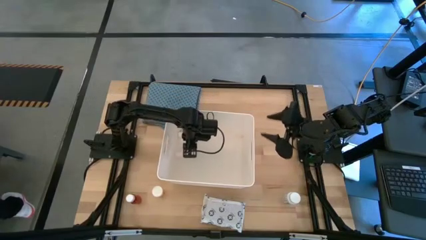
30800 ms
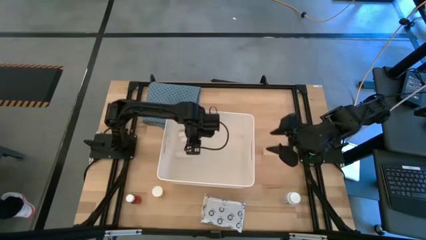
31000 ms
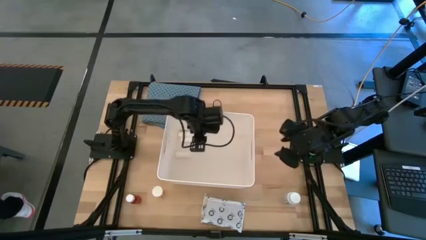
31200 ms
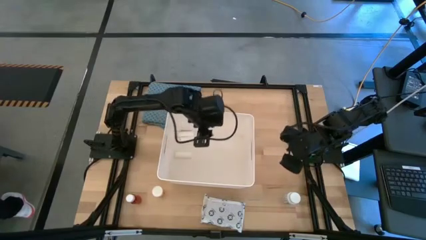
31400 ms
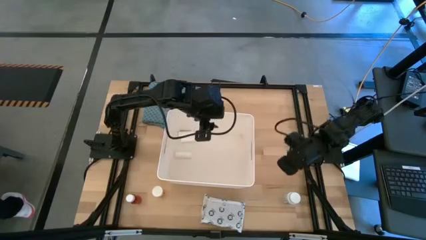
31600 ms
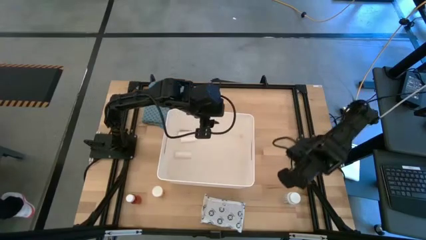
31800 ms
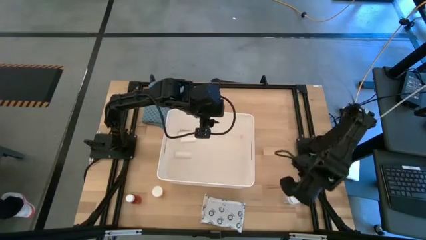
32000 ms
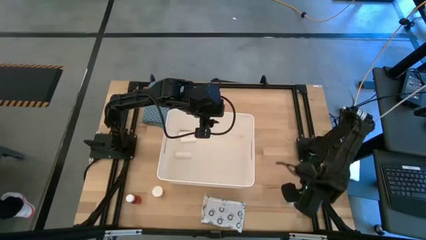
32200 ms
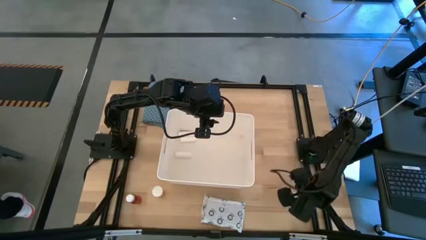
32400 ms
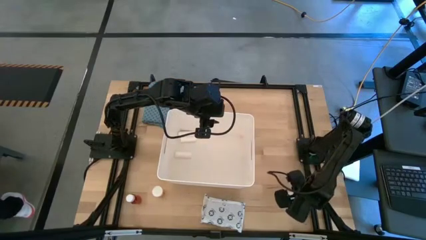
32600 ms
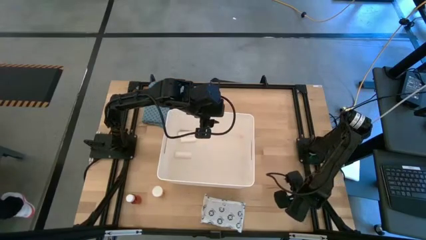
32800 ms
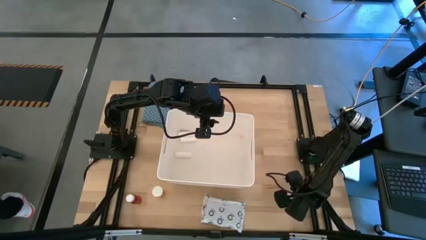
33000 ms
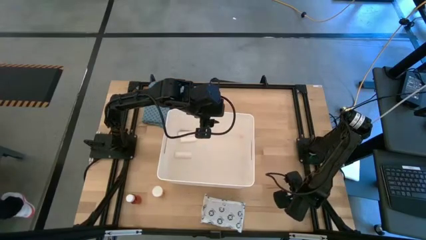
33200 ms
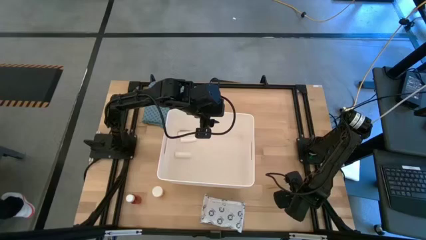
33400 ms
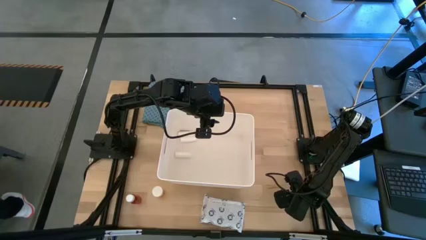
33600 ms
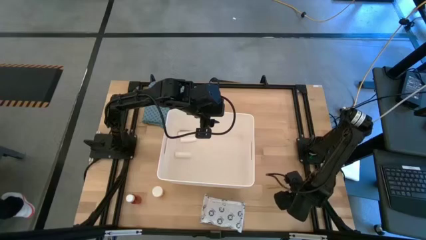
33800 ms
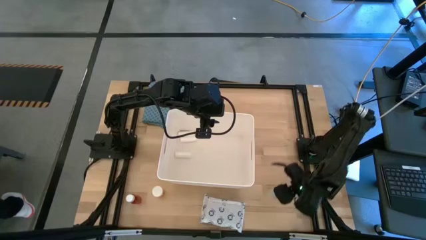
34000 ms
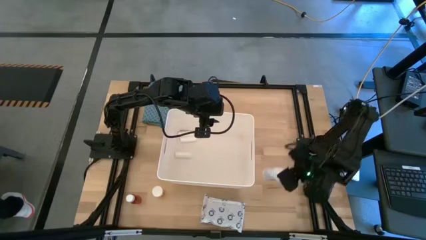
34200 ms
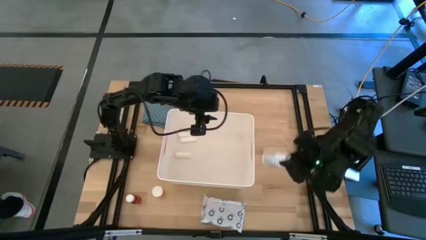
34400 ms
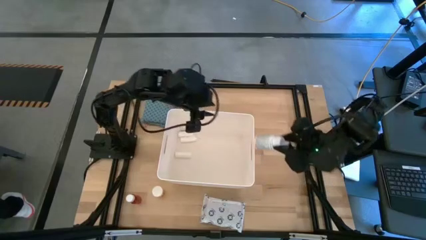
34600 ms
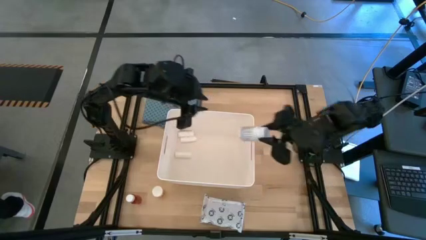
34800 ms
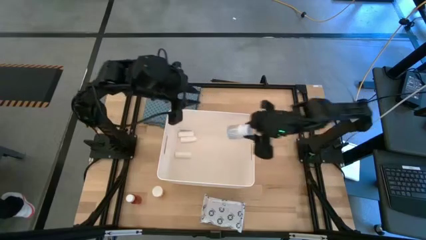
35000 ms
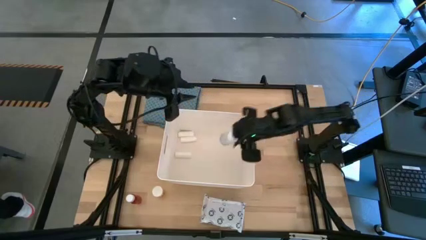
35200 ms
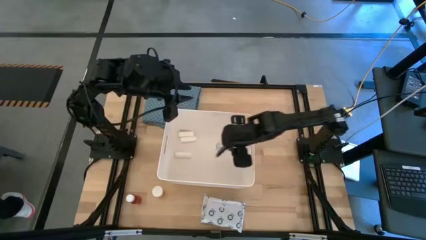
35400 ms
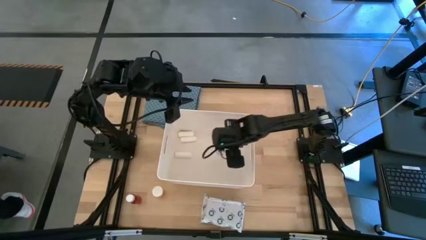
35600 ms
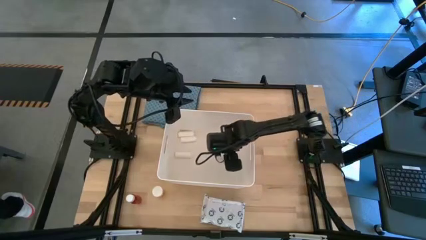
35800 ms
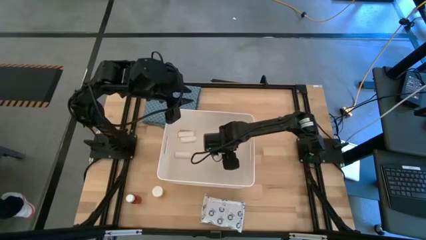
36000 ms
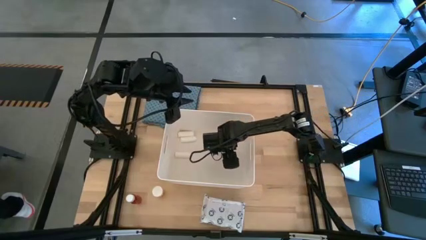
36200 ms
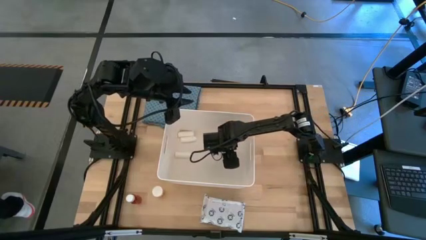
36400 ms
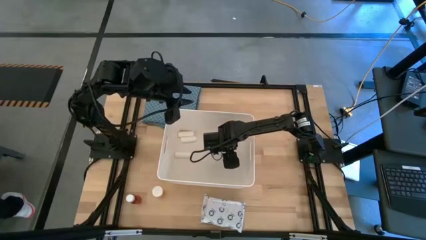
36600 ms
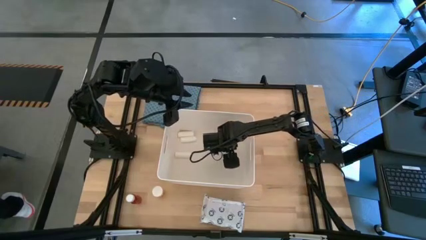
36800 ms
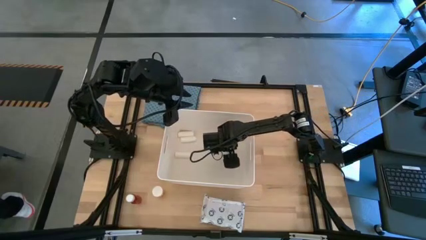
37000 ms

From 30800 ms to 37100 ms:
Task: Pick & place medical supplies in basket/bin
Put the white medicine bottle into the white basket

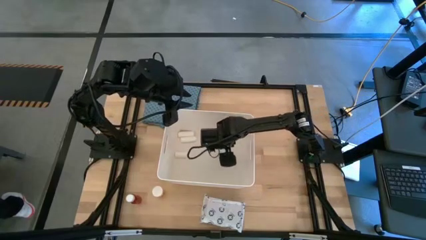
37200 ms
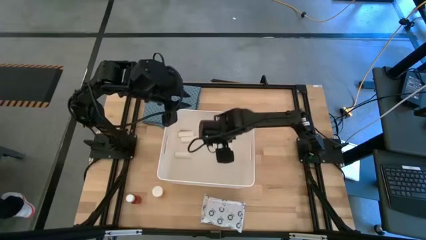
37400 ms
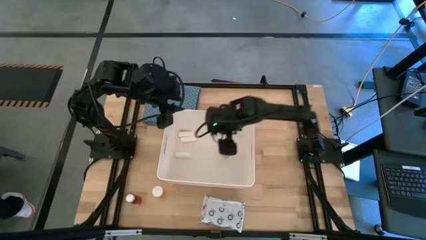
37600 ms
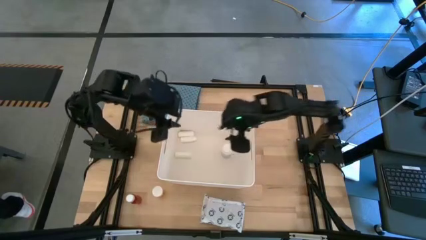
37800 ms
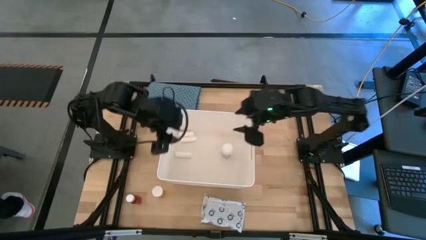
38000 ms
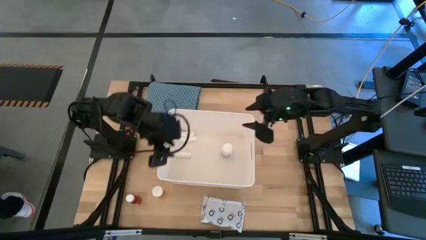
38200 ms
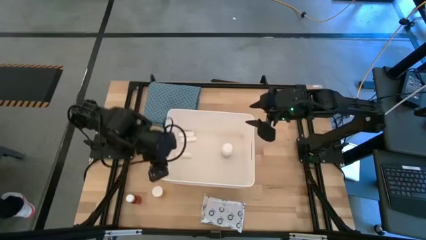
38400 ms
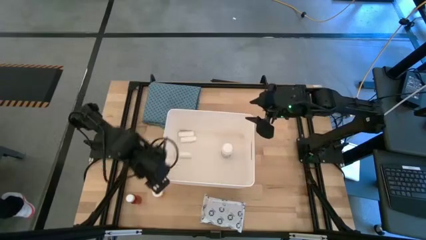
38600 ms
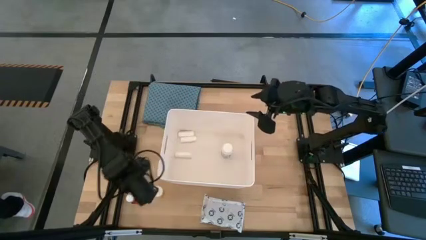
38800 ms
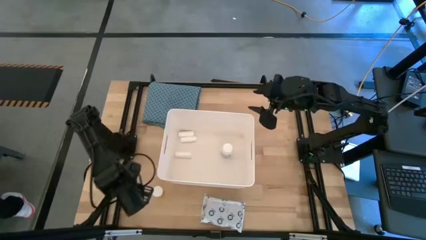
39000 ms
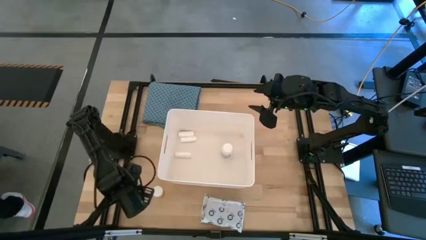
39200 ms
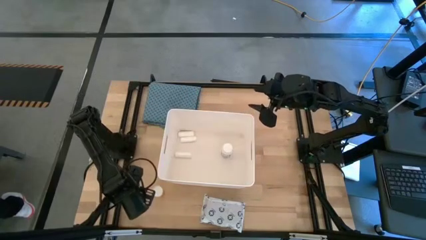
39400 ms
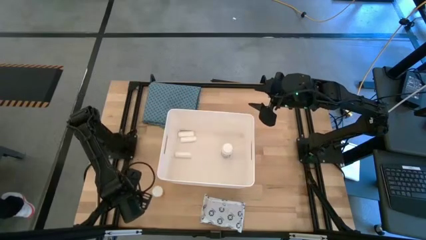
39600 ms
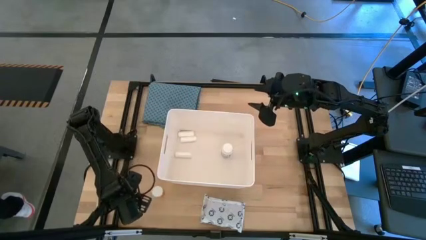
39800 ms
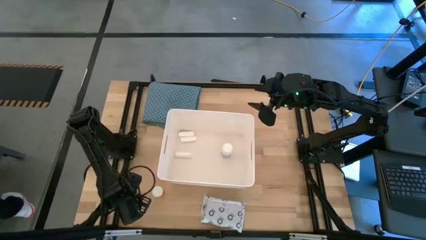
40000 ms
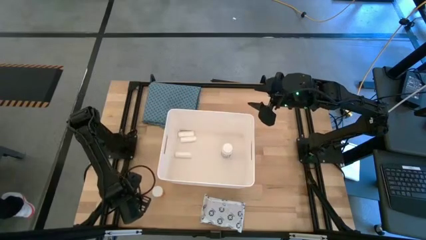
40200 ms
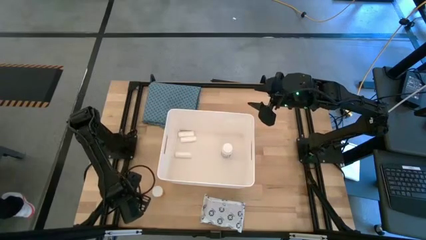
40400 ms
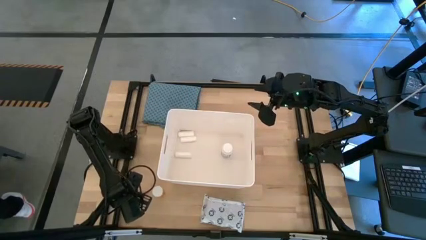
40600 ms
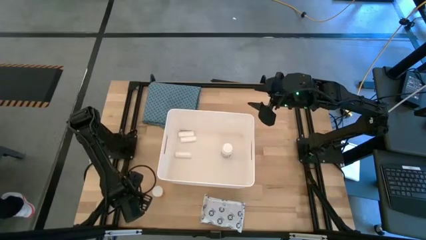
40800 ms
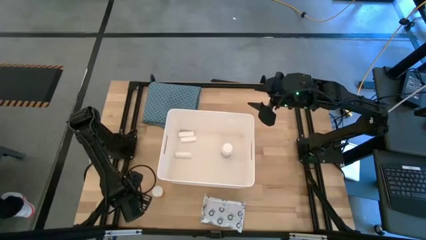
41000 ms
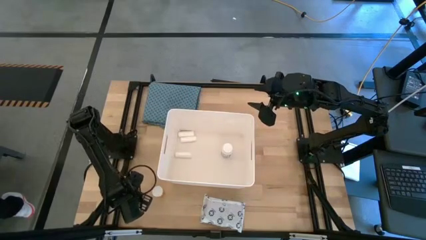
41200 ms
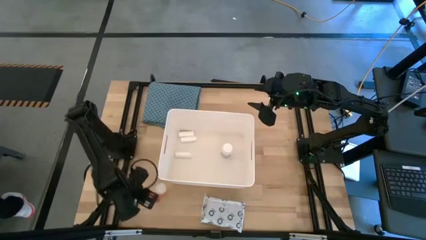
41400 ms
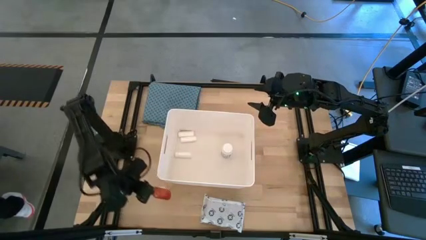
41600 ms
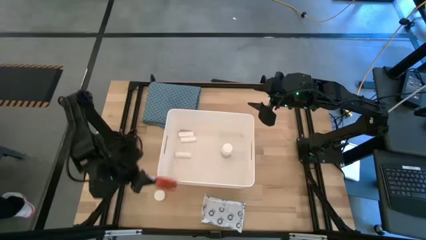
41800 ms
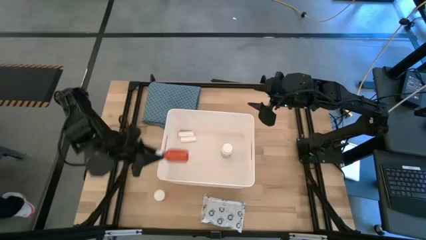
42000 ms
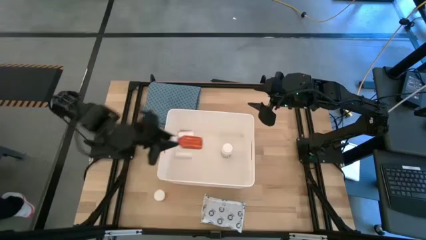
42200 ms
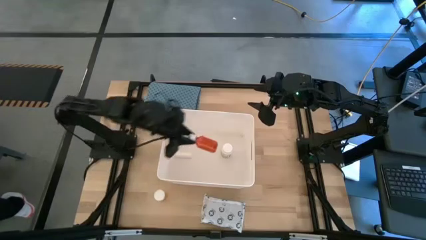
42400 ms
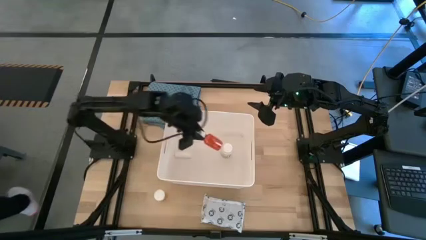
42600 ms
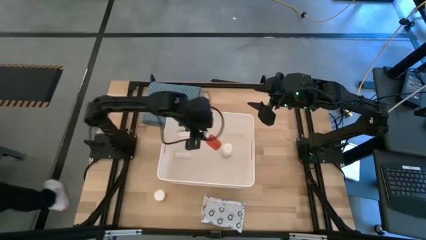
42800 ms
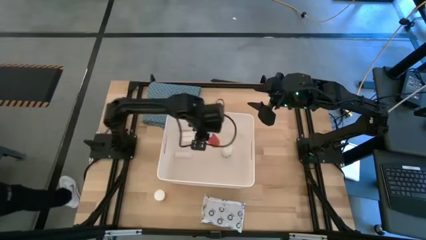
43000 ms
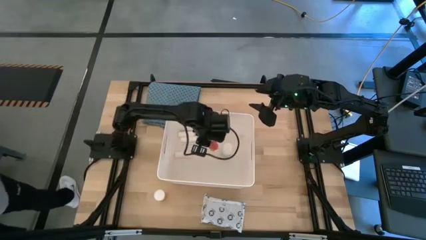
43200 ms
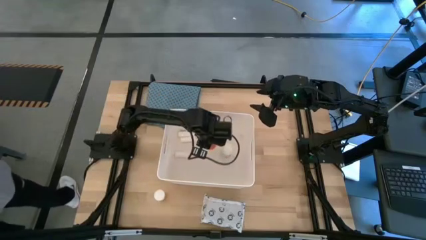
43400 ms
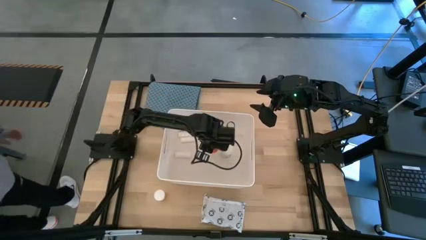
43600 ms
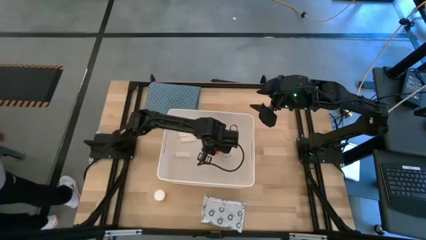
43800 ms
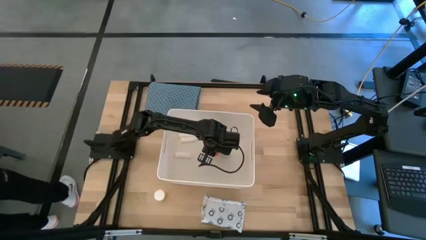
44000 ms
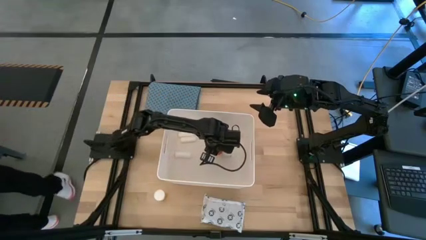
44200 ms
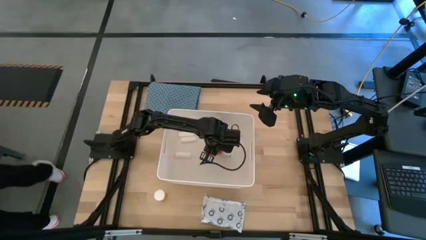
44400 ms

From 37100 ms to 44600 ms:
Put the brown medicine bottle into the white basket

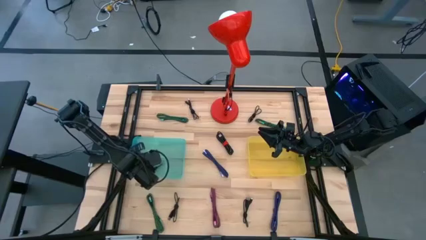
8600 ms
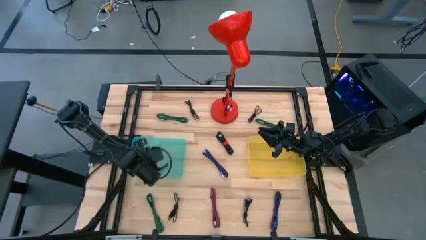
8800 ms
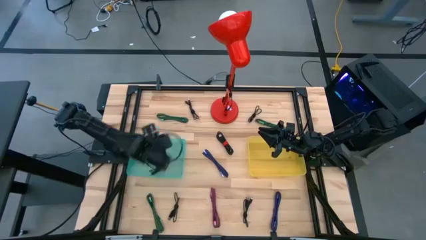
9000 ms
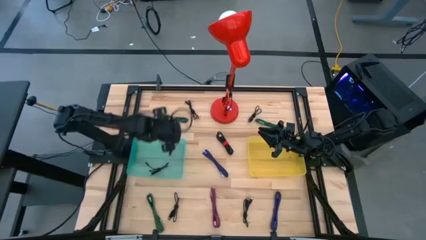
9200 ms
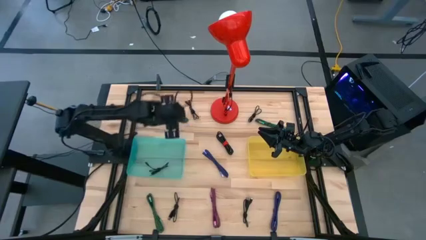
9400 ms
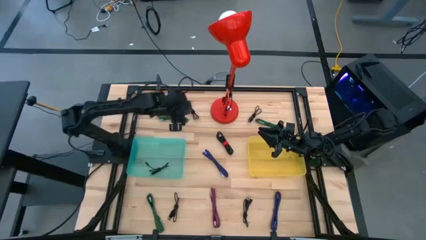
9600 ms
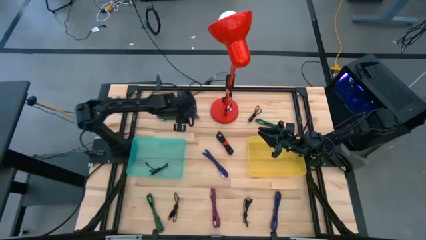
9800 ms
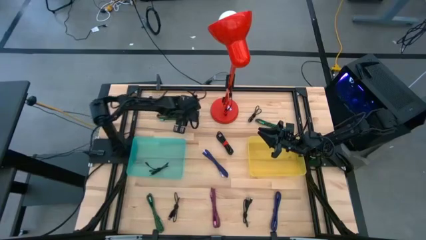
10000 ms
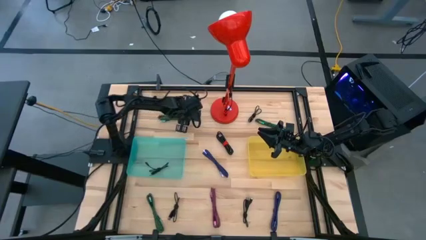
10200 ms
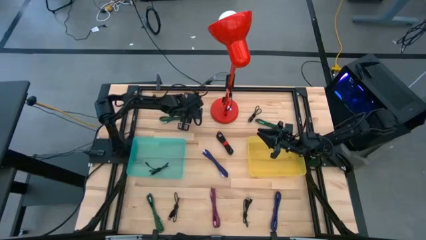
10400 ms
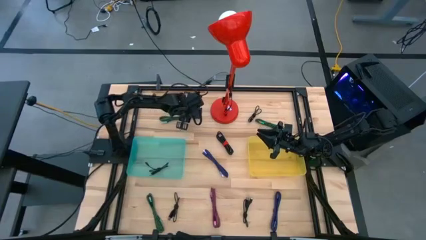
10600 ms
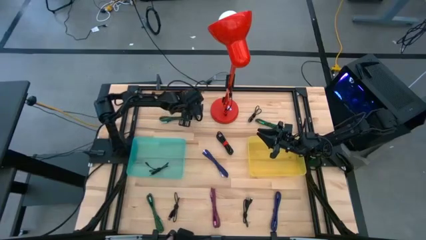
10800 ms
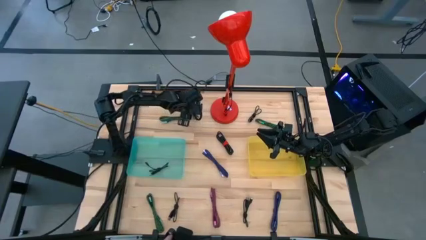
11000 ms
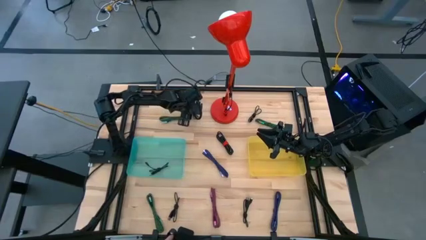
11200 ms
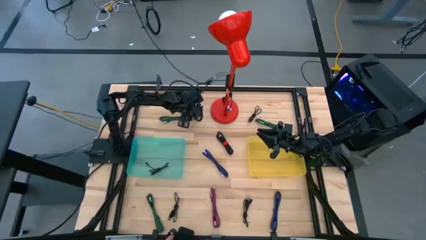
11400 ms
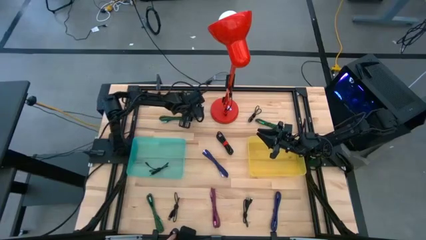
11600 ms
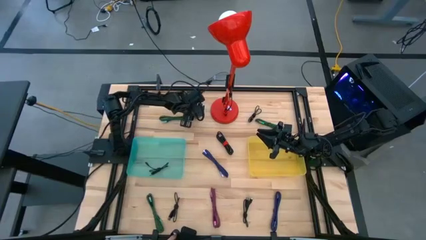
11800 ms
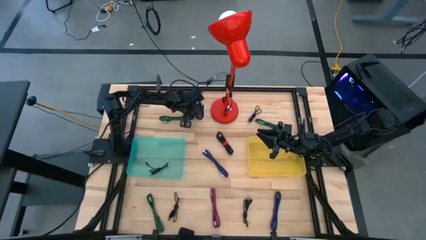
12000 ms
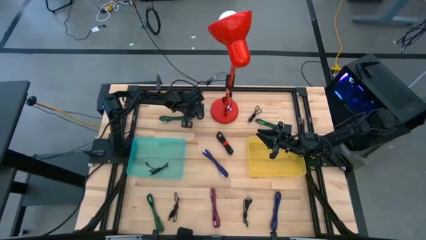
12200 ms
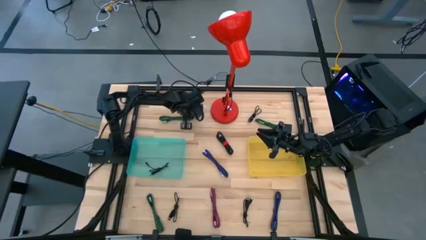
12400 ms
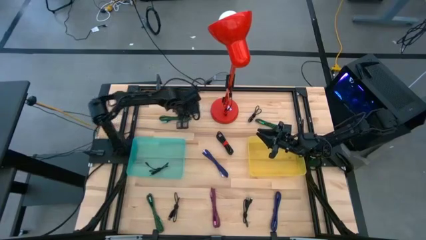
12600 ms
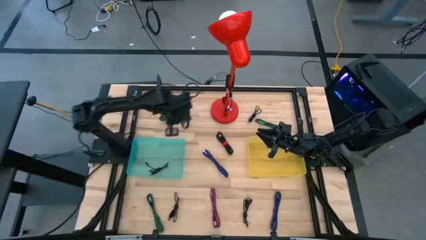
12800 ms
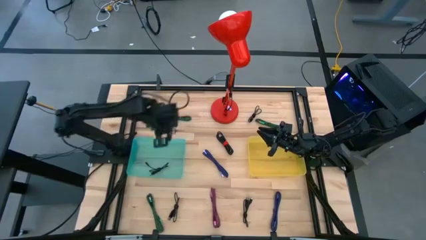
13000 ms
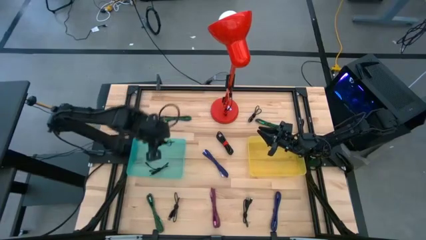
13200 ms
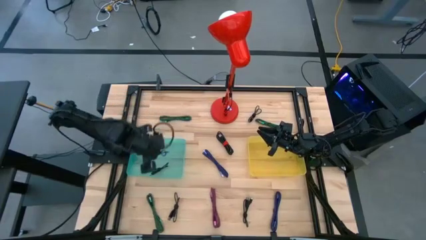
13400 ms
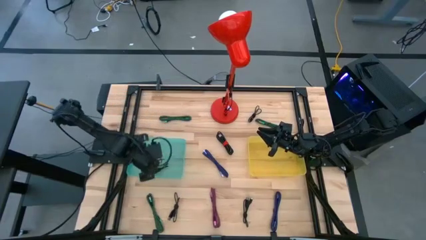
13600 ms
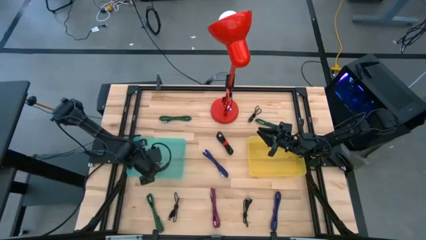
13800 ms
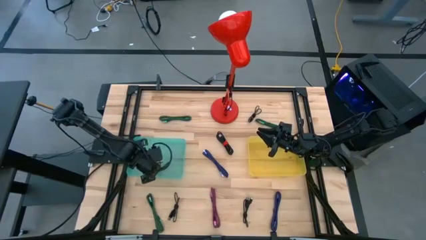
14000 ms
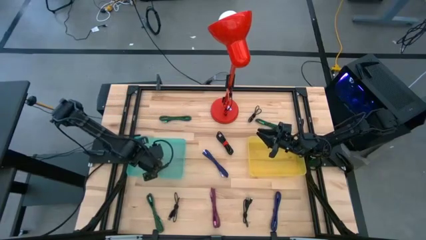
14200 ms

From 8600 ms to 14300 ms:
Task: Pick & Place USB Port
Put the black charger cable into the green bin
